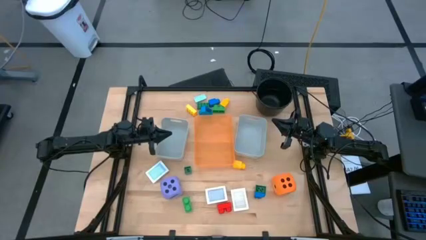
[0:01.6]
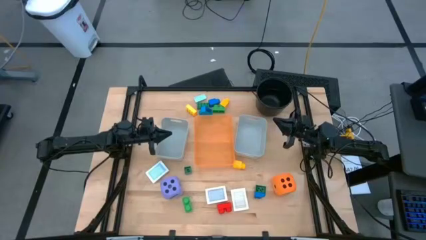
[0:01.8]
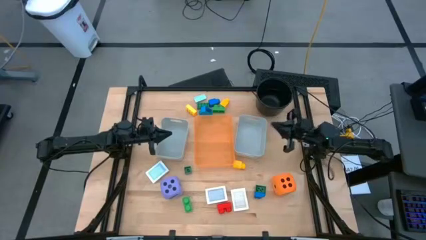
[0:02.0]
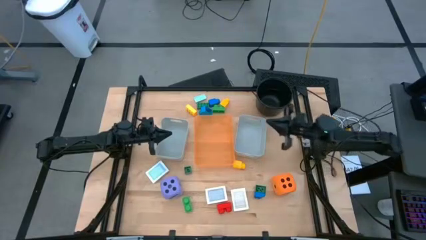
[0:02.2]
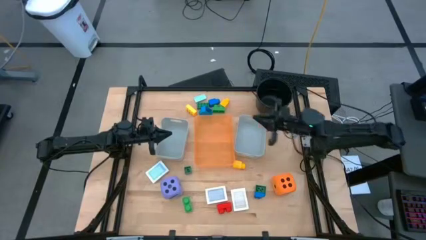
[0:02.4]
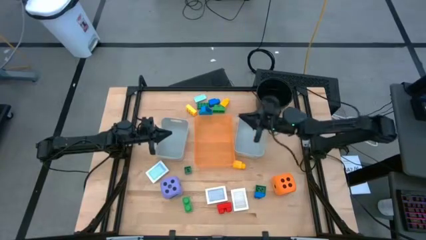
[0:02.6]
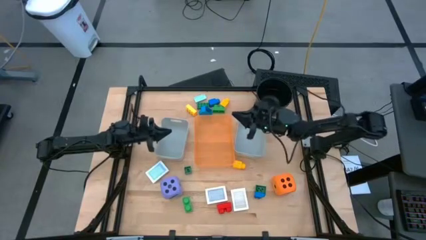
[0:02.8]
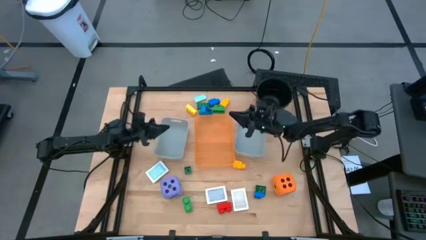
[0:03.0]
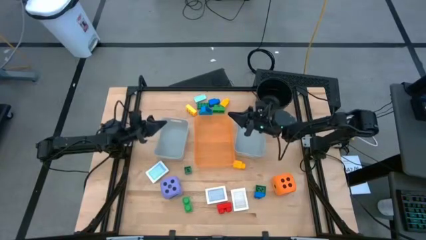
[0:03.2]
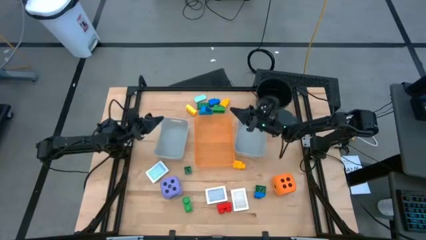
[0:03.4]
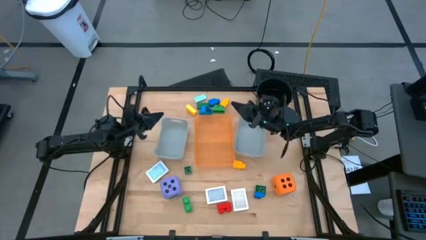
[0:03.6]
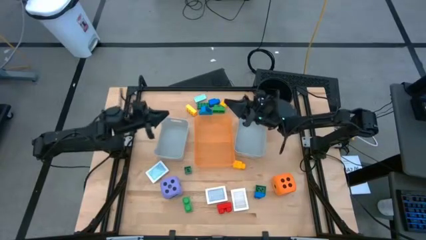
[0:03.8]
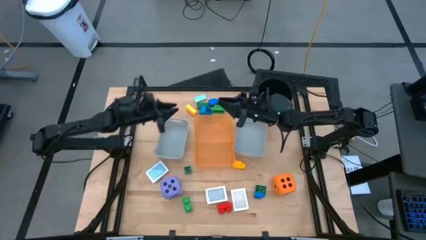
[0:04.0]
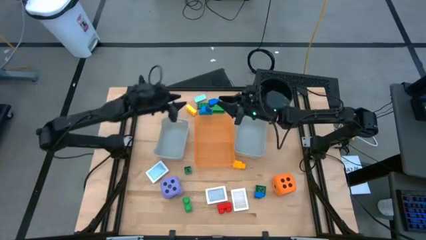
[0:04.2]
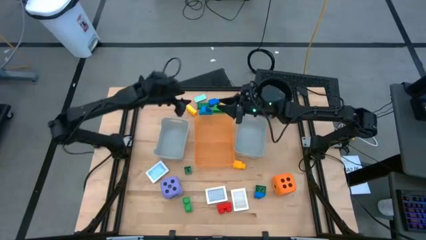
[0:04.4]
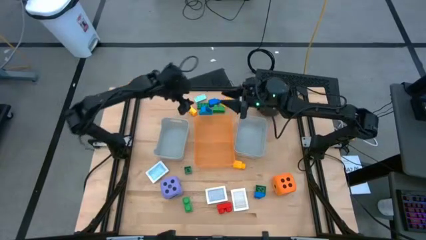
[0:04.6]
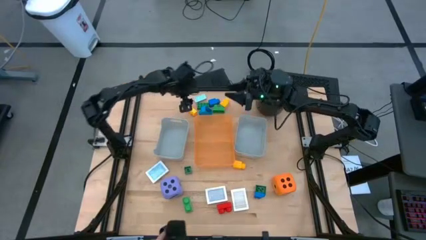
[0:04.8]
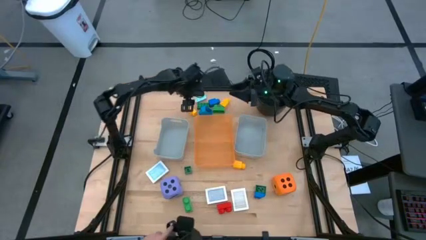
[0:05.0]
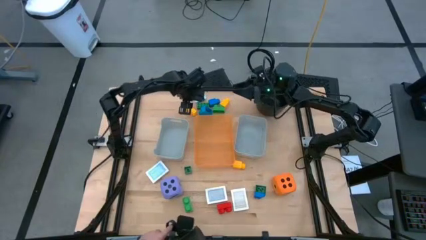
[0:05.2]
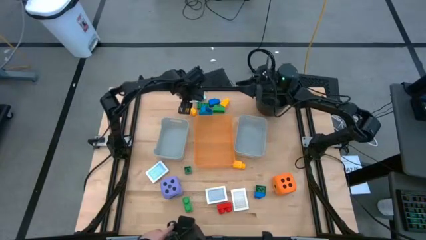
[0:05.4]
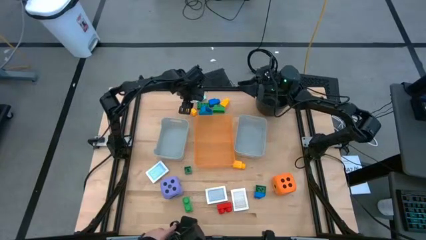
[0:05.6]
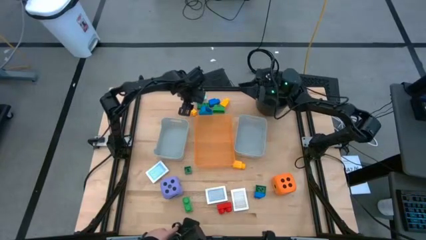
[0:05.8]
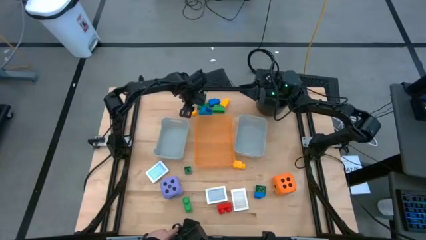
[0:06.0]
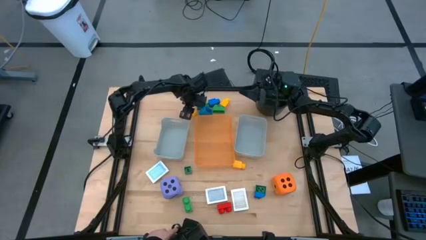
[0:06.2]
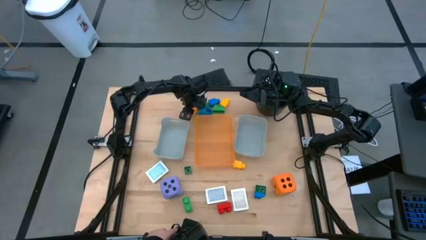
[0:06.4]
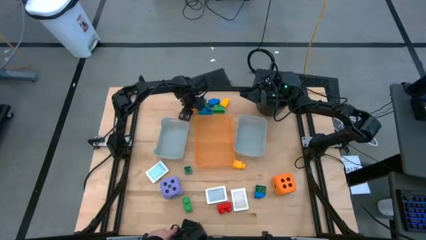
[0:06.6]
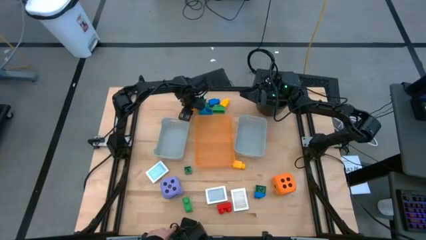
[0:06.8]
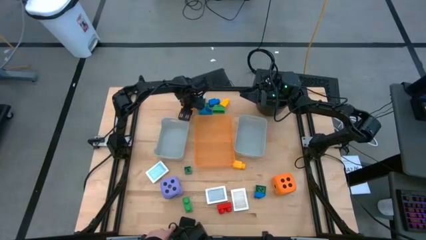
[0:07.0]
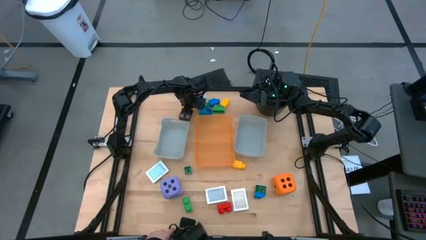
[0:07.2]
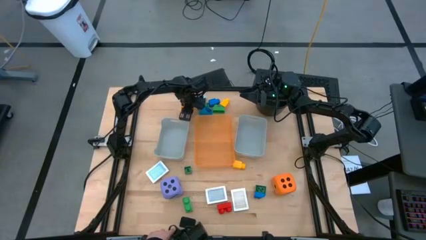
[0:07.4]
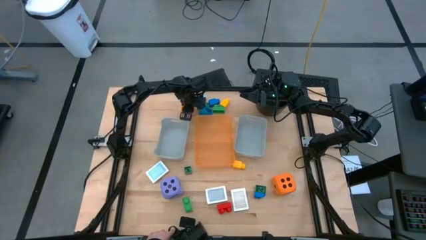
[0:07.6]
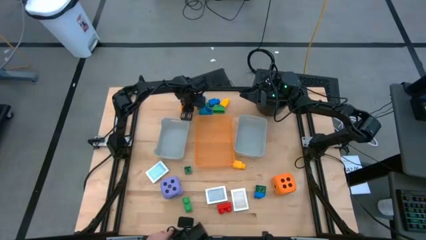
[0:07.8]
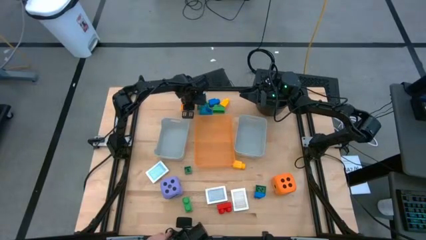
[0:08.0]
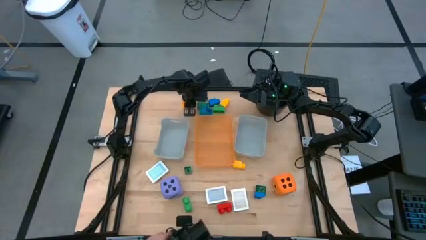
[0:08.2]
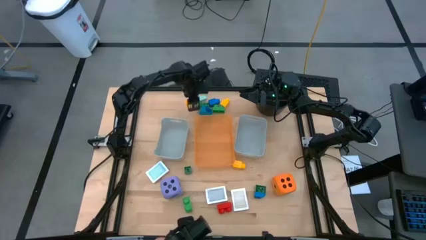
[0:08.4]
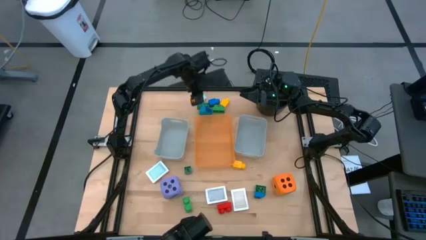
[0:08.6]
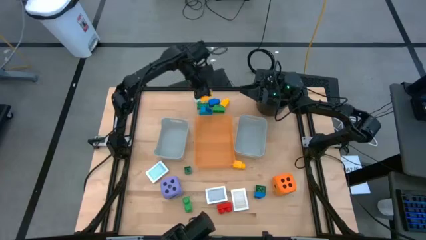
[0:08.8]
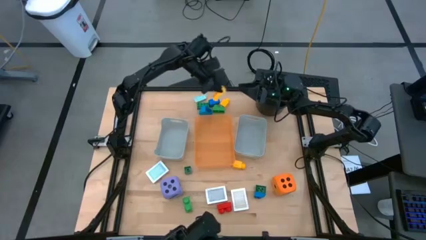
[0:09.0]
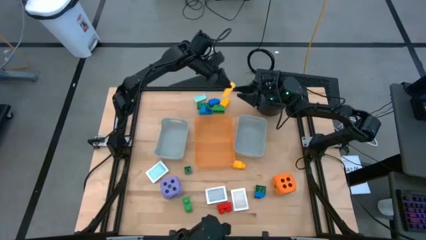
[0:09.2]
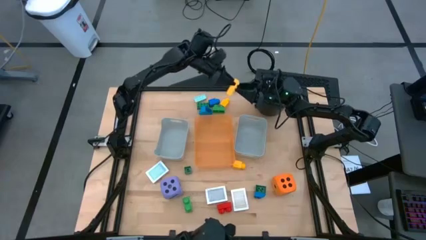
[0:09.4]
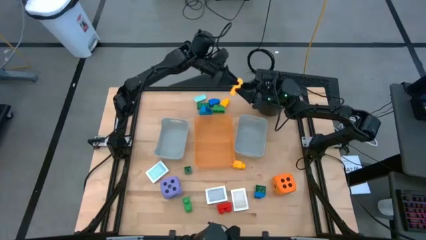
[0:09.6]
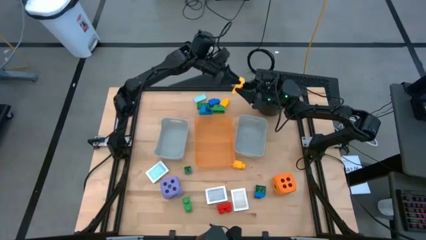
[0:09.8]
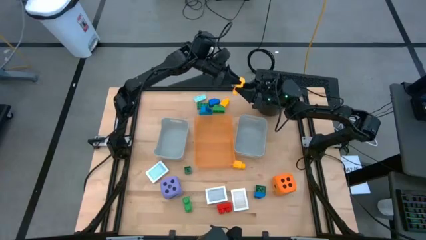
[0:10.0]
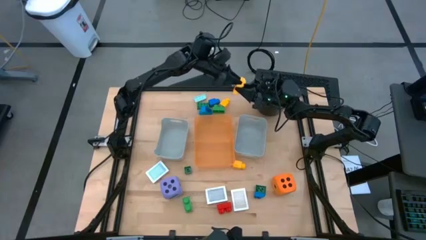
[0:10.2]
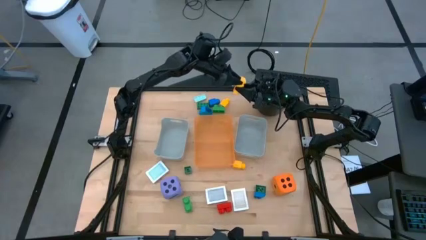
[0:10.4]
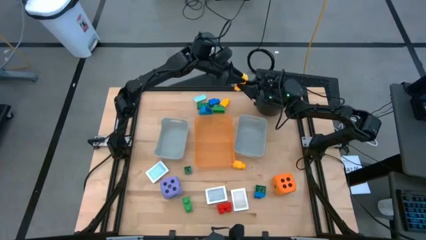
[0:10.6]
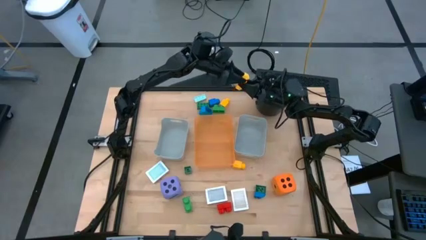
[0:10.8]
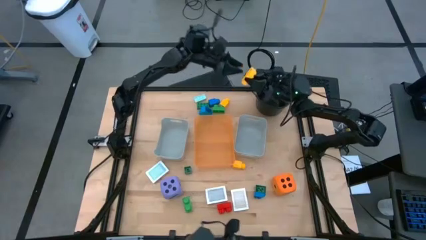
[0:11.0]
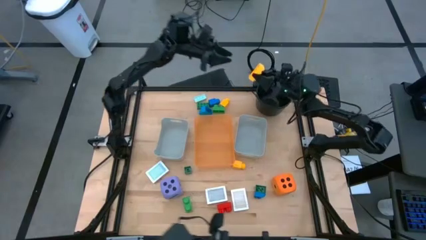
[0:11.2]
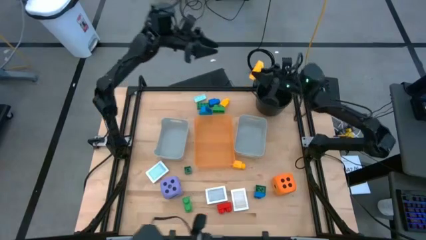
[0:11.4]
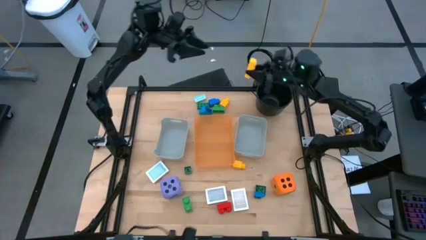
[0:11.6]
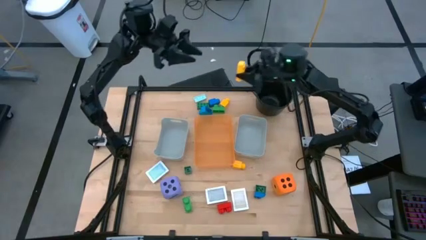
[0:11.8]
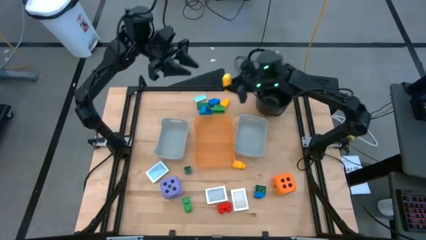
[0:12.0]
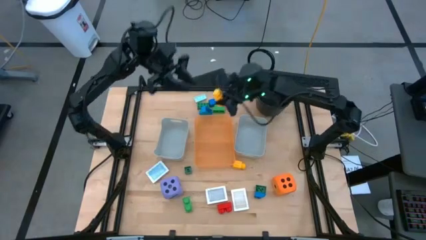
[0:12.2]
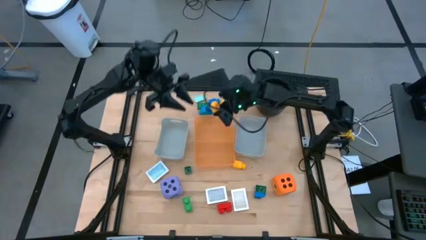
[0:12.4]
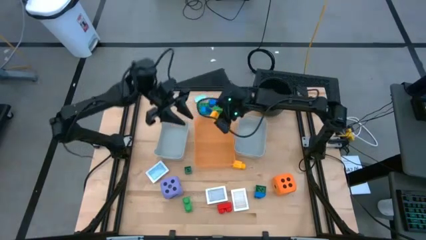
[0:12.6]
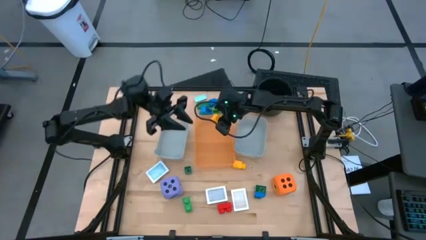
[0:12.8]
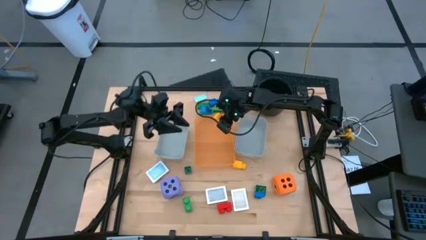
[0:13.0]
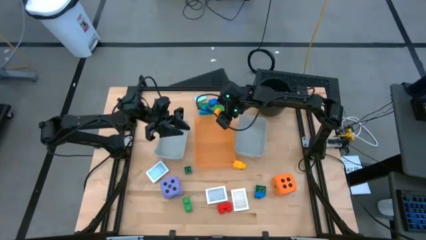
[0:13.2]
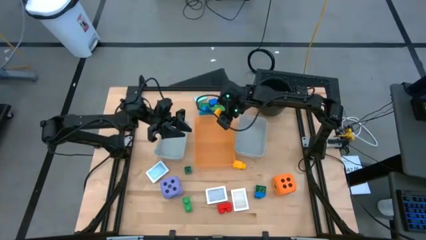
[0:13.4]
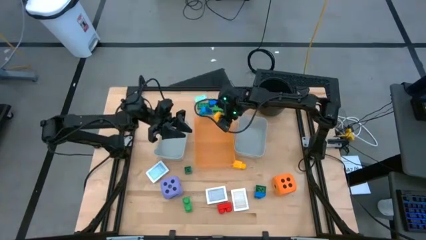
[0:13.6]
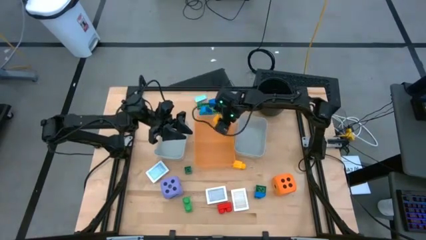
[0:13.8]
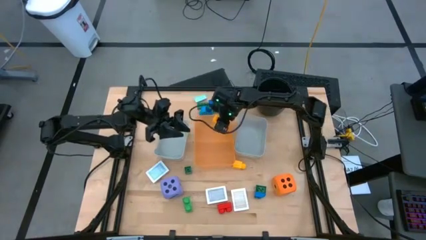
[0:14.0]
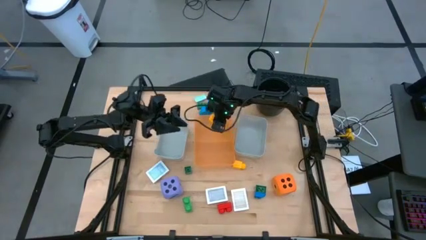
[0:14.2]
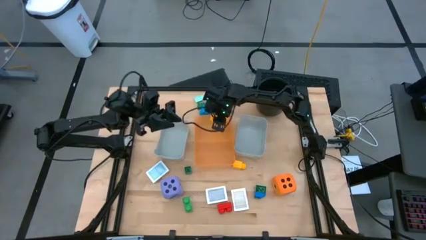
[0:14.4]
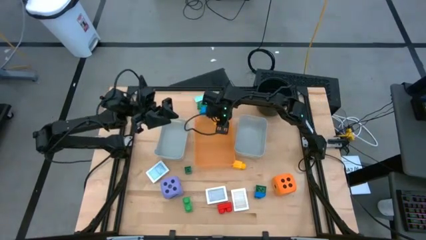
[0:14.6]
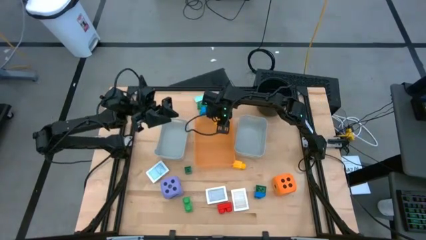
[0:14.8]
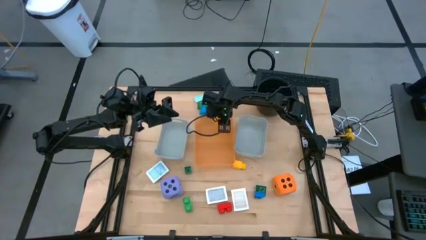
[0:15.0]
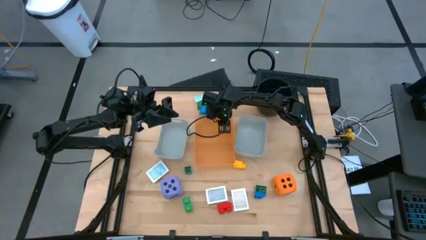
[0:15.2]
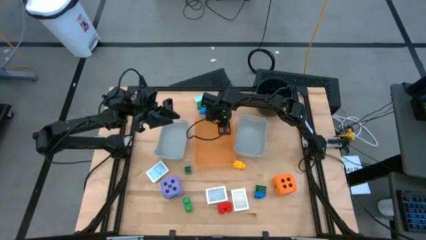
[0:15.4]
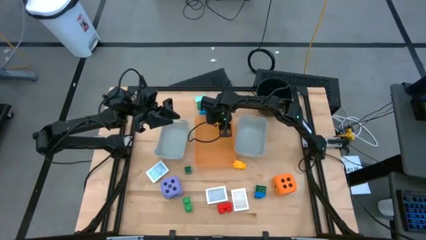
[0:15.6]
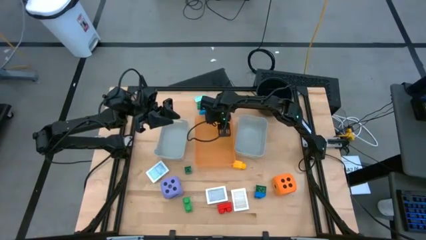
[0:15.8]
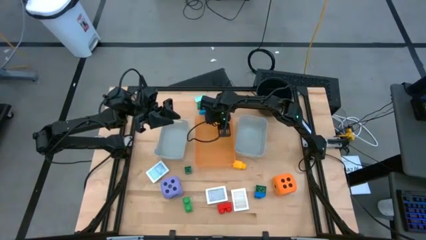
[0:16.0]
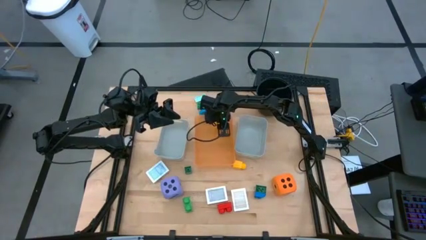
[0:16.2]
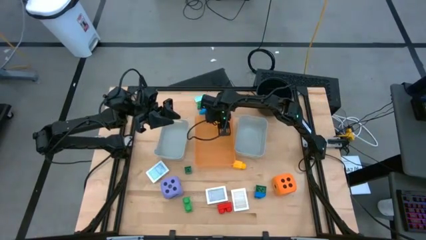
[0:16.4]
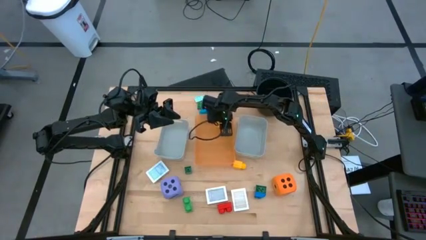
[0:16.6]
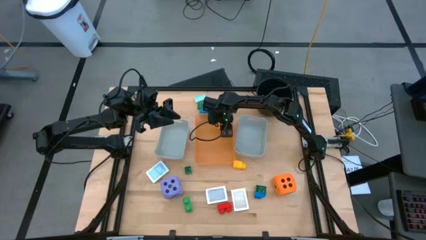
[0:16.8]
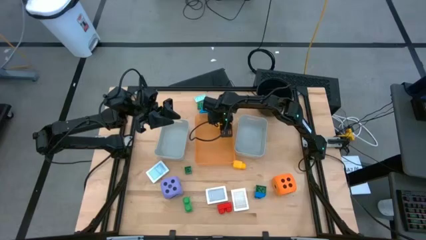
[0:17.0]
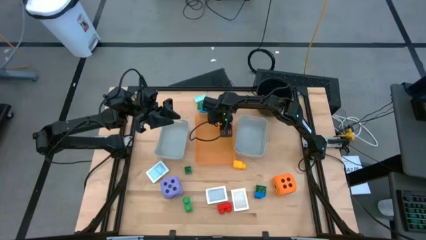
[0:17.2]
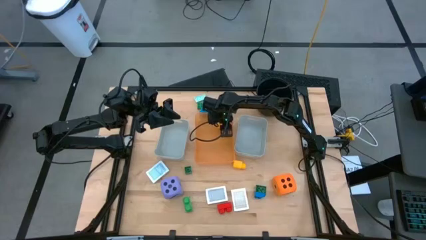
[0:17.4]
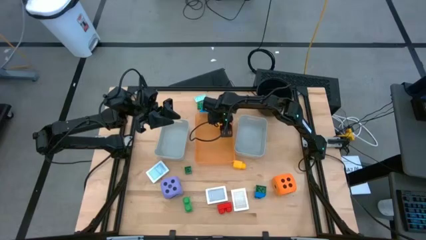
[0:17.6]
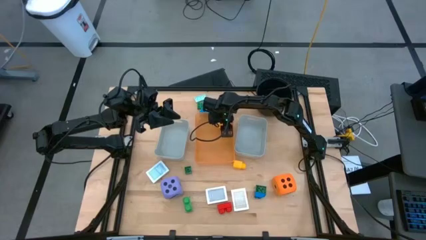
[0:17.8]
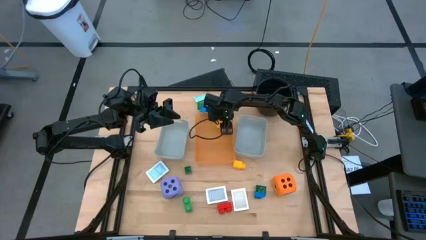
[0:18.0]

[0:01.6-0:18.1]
Task: Pick & Place Toys
Put the yellow game piece into the orange bin
